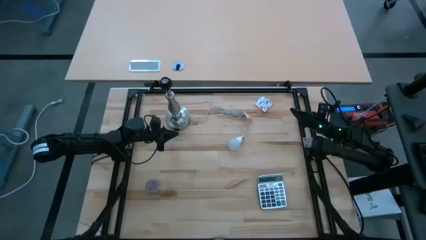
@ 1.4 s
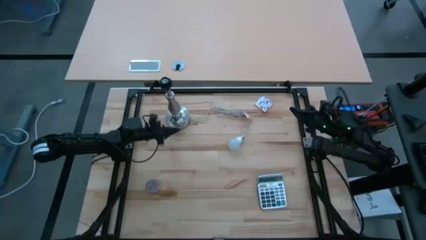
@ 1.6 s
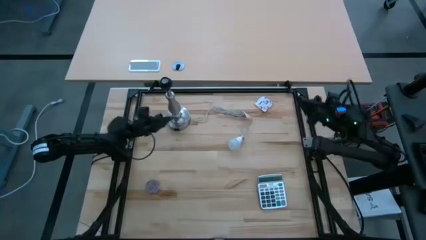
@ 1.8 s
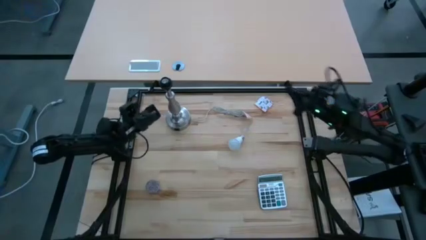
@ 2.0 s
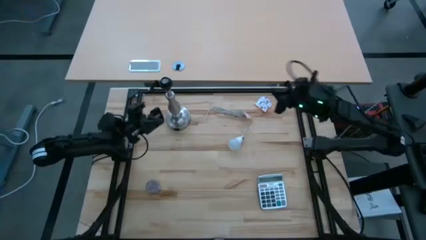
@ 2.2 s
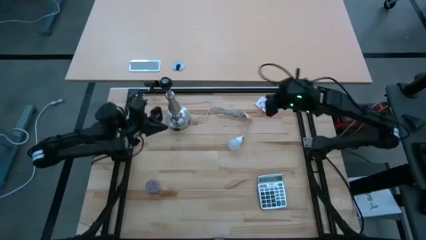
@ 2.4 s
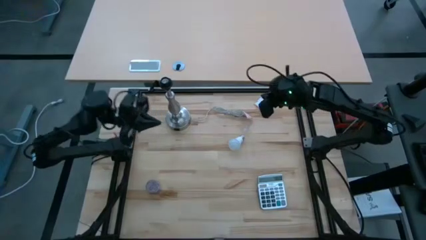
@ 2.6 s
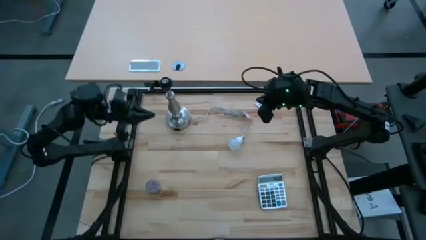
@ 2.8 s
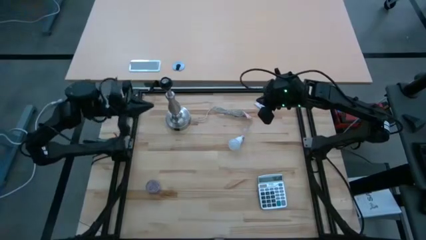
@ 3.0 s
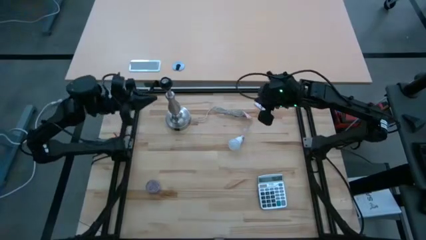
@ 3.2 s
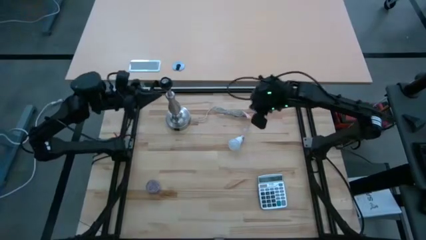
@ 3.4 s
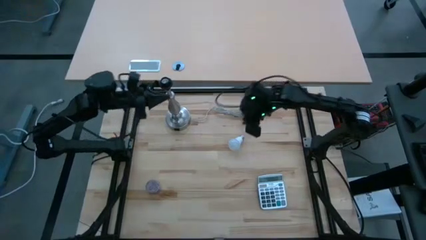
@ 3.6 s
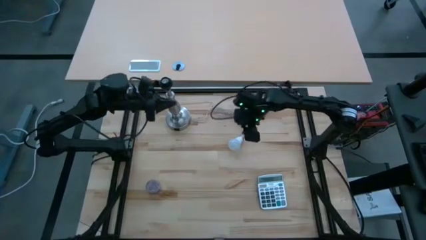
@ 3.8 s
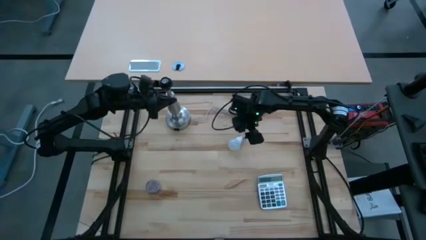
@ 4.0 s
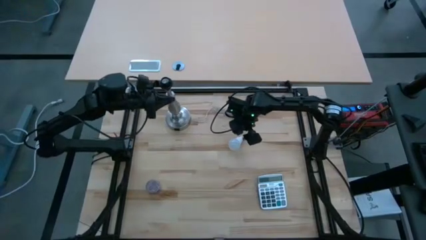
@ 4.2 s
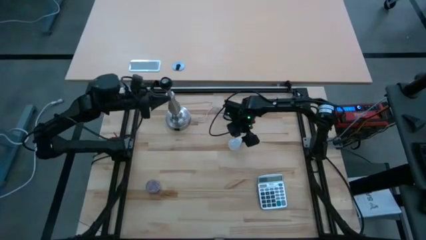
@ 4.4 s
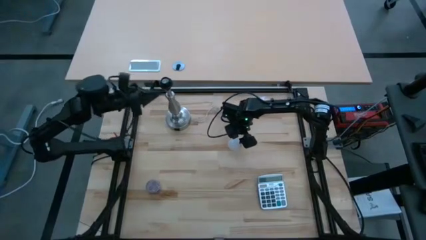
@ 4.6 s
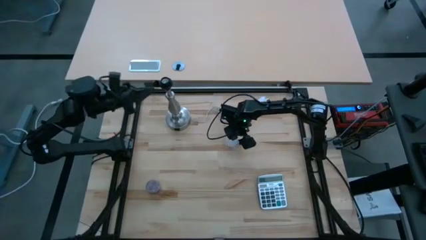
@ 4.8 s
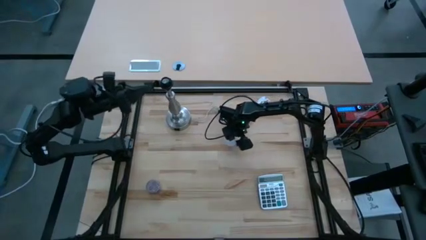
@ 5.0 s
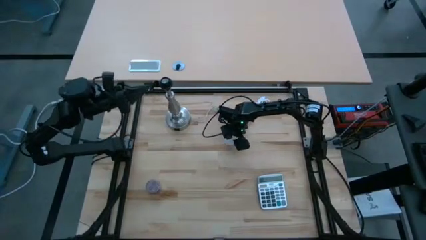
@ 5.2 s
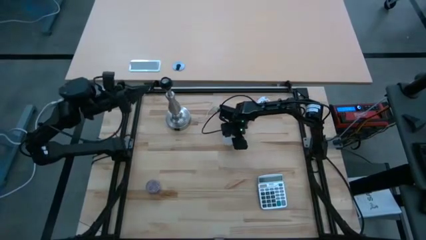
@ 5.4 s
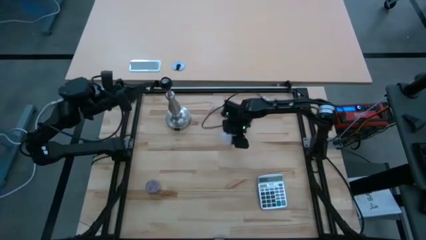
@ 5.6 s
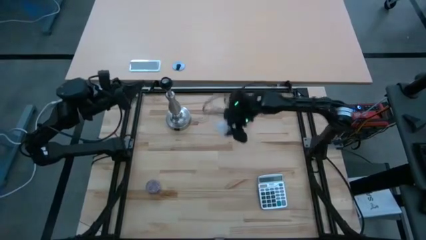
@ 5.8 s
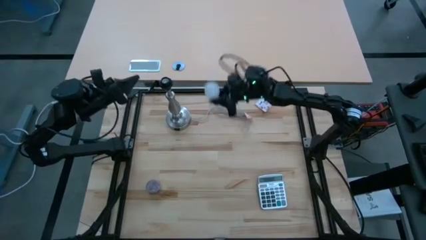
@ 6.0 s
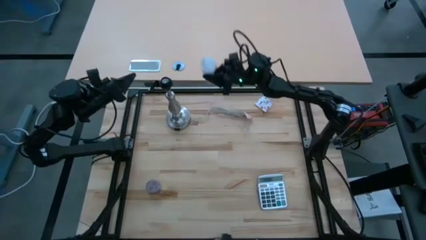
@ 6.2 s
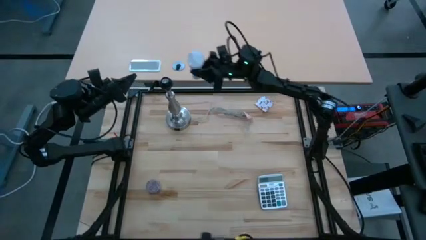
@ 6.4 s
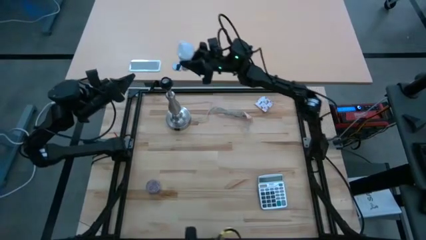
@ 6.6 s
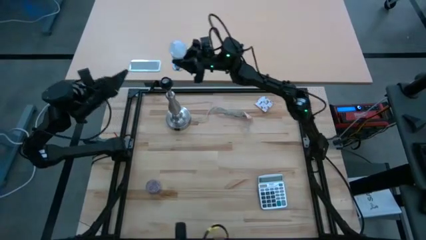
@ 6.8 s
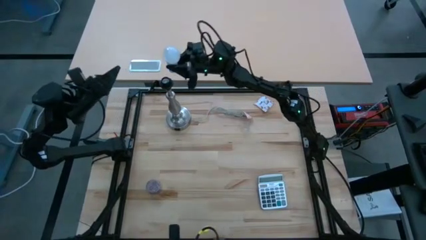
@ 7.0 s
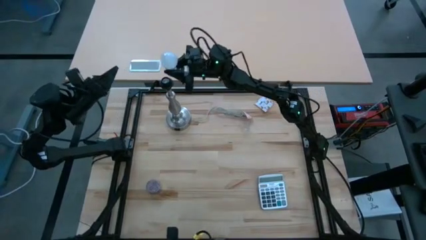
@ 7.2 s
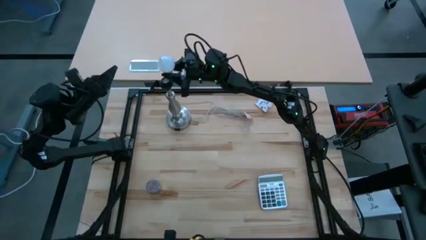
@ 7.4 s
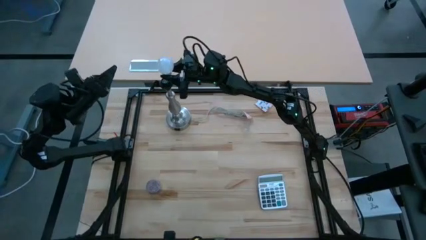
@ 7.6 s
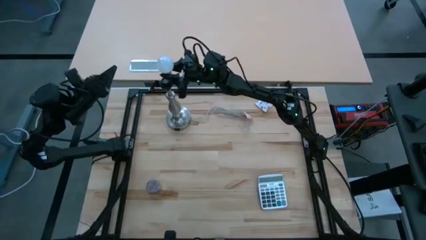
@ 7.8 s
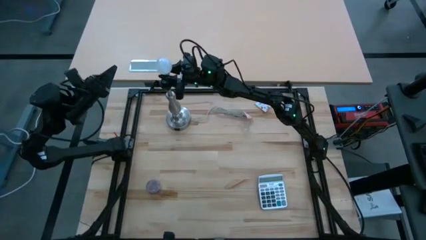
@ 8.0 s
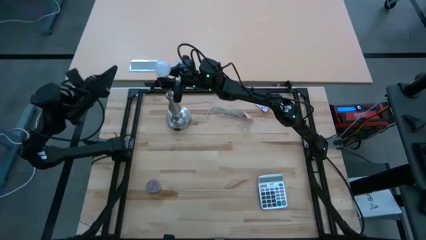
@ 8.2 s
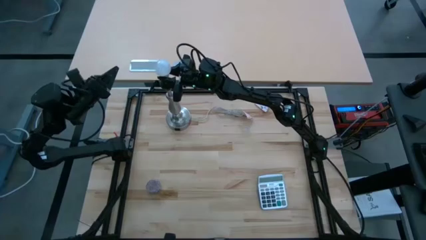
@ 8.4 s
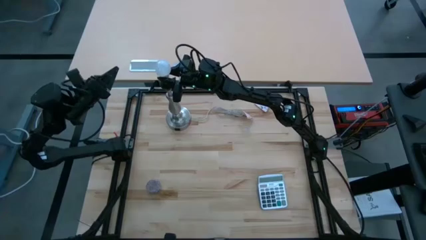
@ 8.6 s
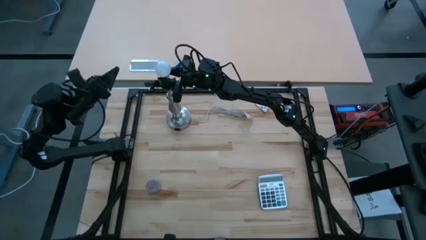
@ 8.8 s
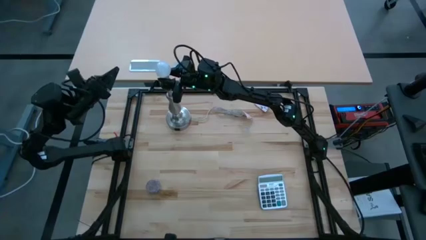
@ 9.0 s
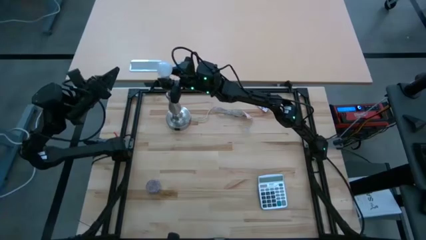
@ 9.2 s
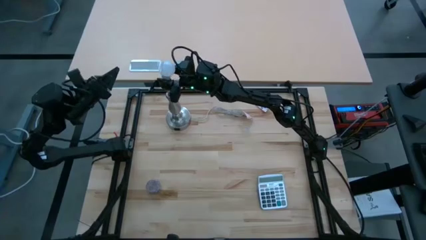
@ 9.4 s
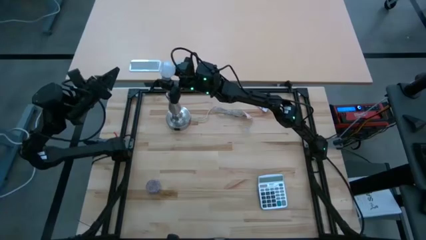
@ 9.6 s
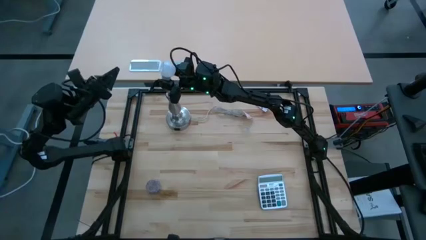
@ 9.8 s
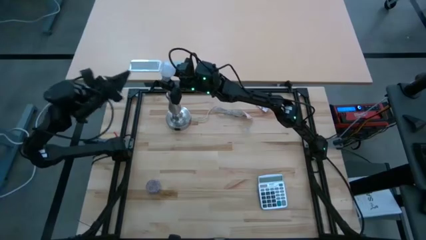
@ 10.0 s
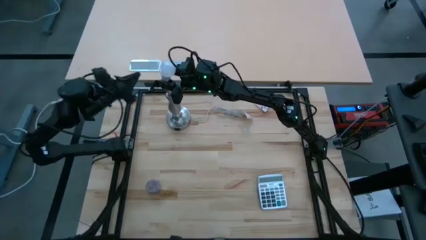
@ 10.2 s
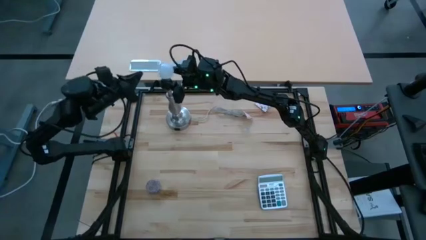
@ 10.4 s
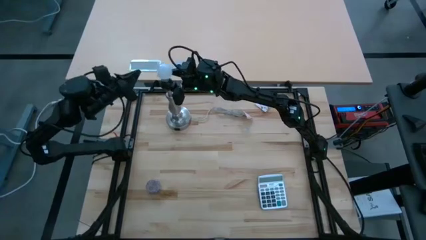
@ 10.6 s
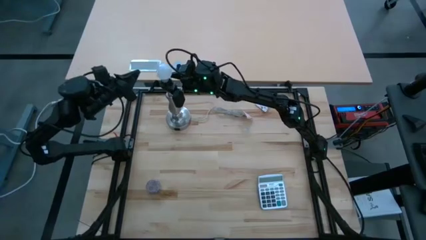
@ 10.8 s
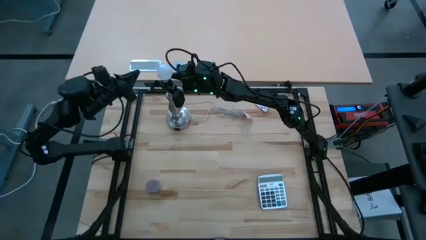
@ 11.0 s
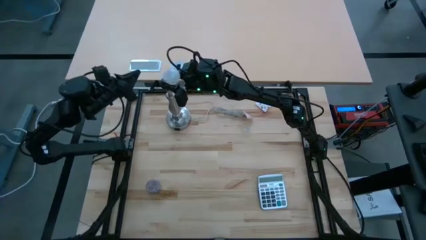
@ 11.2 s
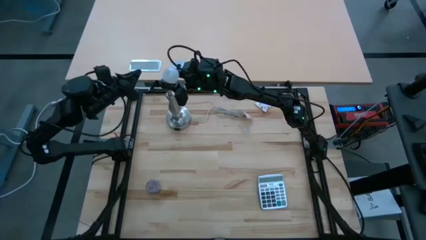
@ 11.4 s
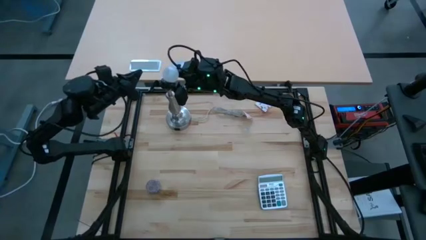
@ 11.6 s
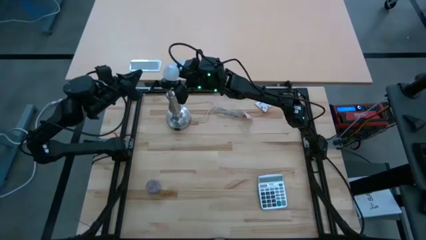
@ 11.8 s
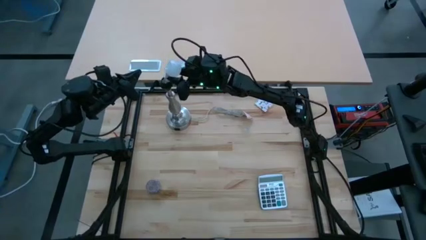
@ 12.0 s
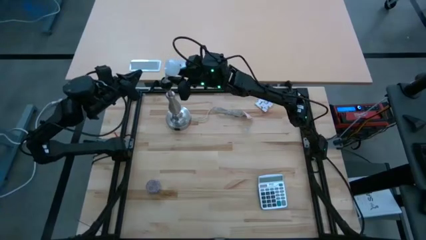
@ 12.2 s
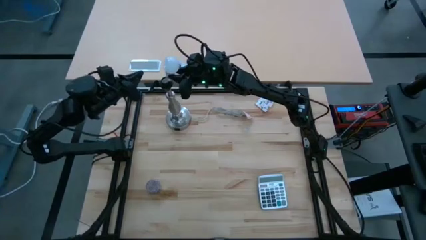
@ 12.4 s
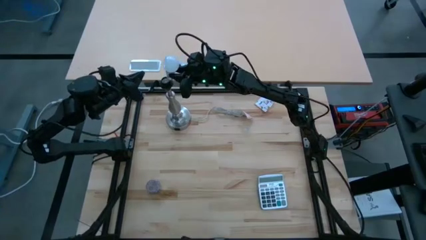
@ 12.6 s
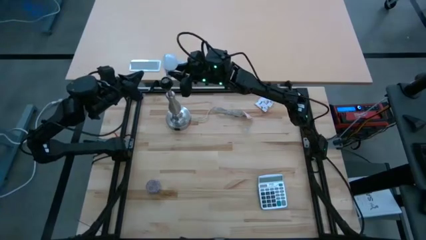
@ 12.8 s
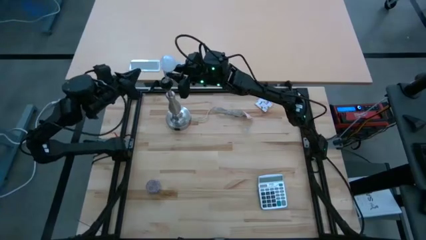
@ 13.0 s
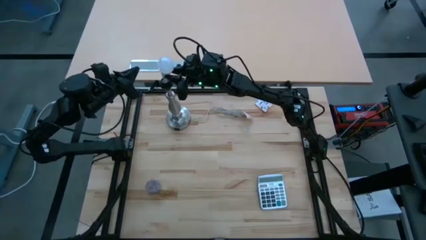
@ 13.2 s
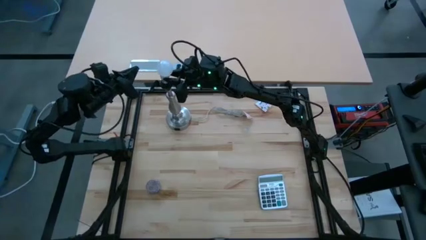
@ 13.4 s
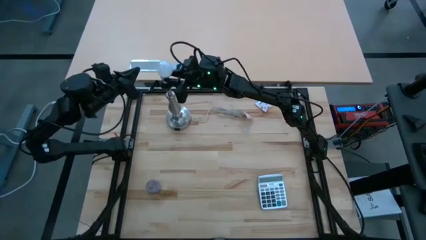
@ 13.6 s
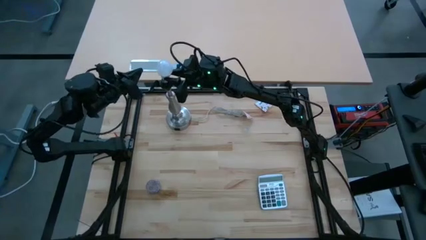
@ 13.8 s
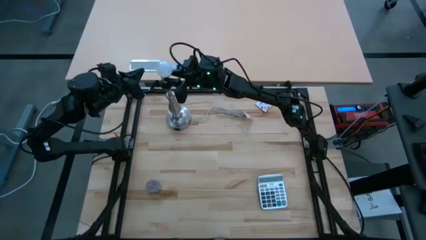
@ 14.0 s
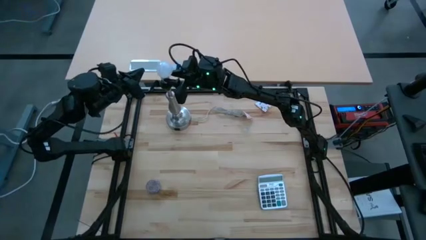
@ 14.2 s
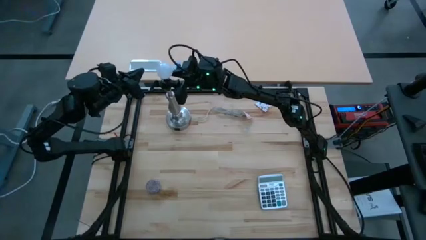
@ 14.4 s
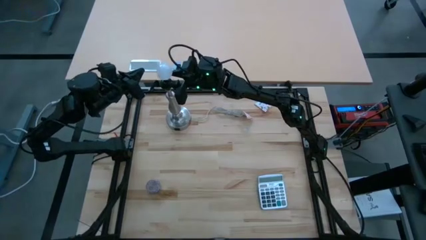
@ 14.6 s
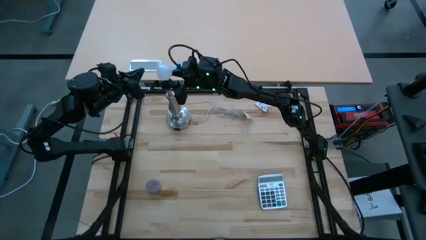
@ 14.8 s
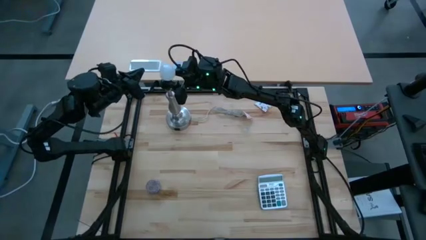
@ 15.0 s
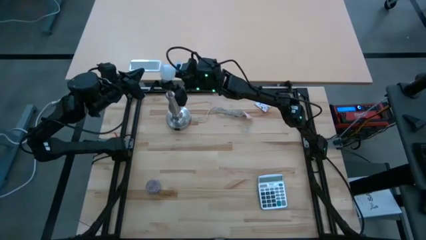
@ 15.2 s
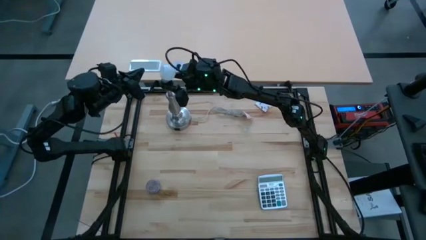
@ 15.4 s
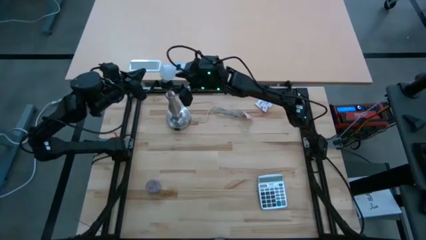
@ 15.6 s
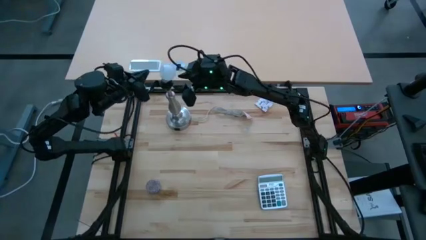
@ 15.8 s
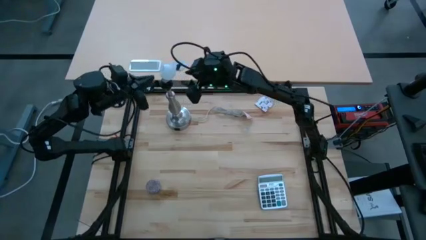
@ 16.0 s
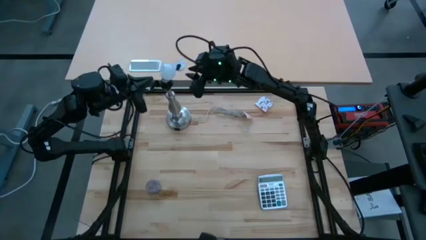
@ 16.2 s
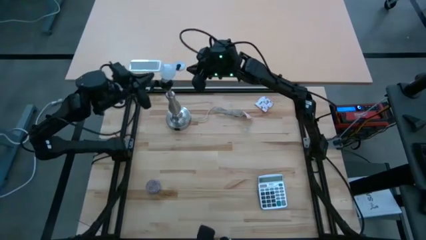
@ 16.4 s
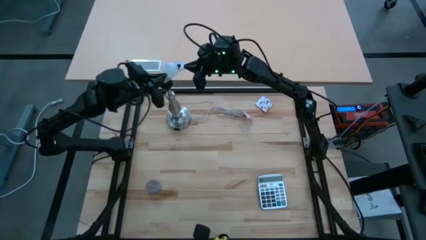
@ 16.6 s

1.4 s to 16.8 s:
Task: Screw lightbulb
Insert the lightbulb into the lamp
